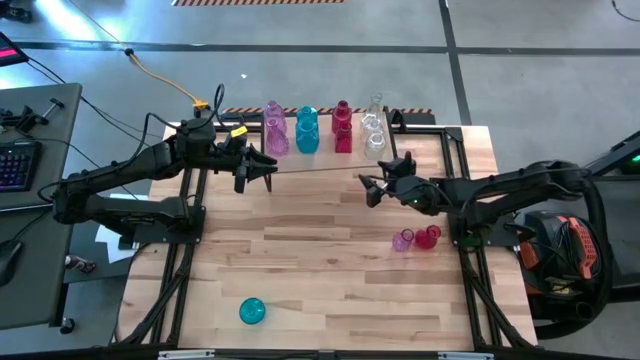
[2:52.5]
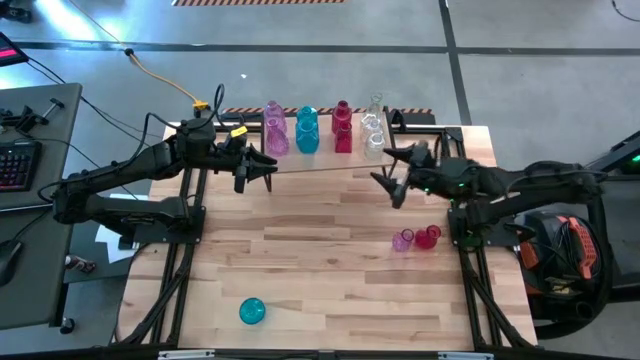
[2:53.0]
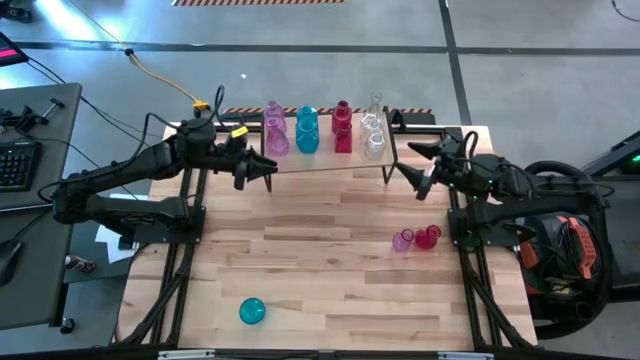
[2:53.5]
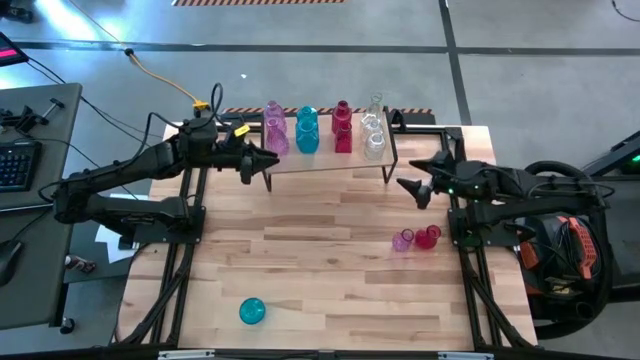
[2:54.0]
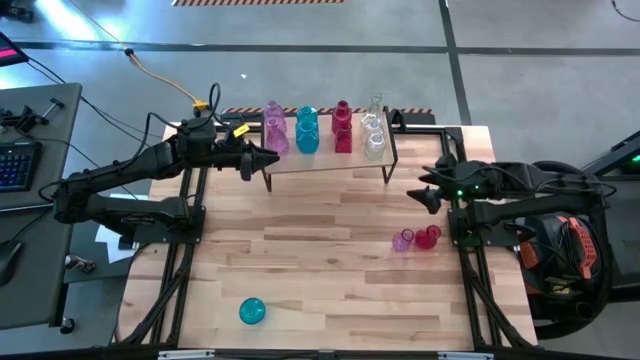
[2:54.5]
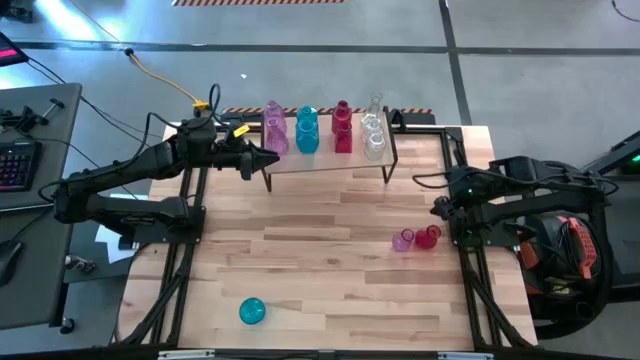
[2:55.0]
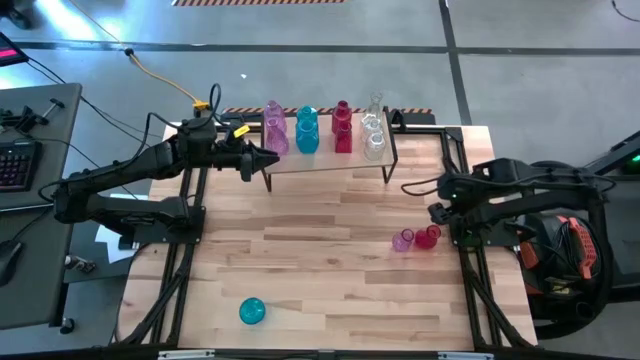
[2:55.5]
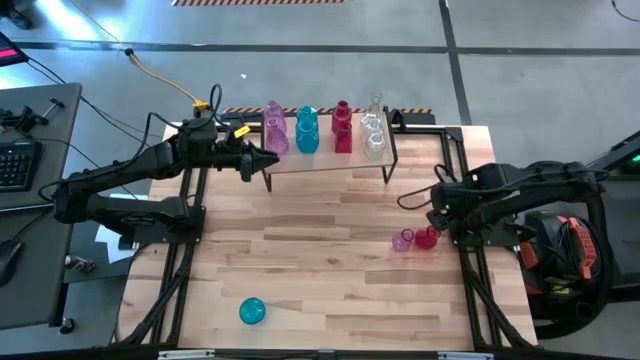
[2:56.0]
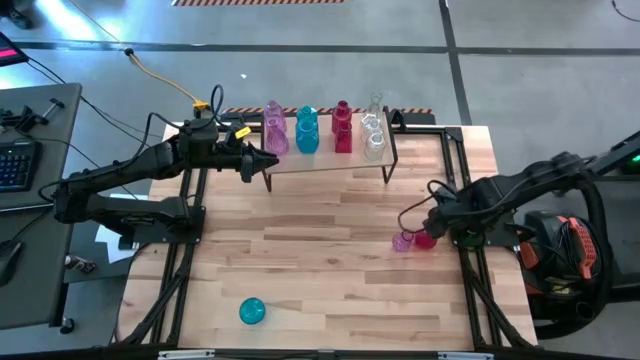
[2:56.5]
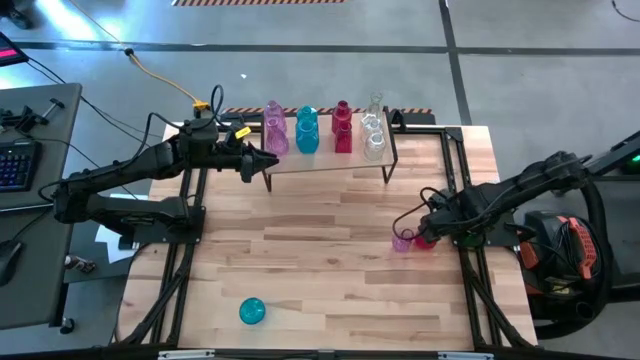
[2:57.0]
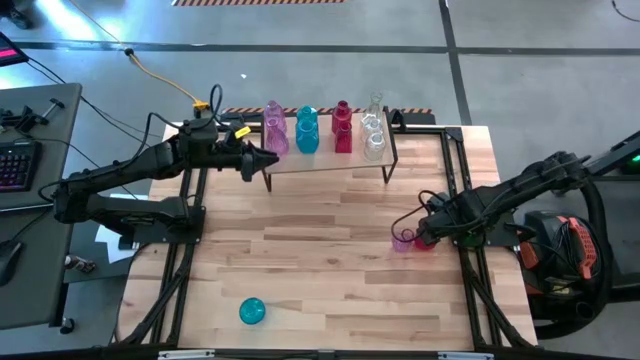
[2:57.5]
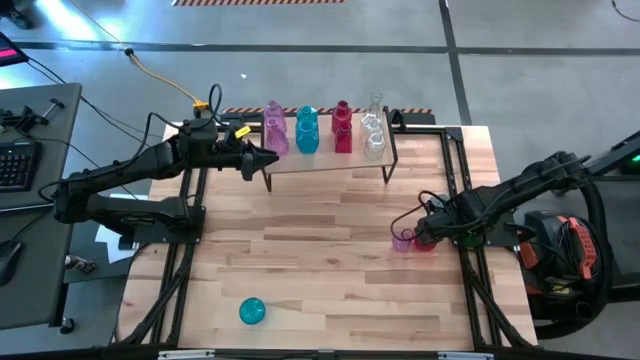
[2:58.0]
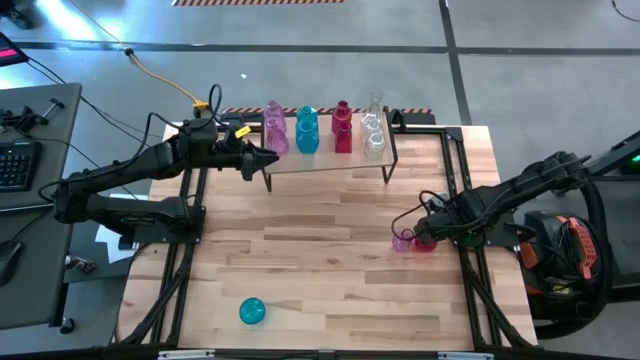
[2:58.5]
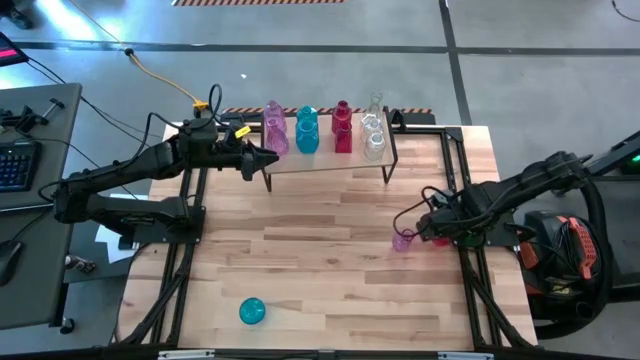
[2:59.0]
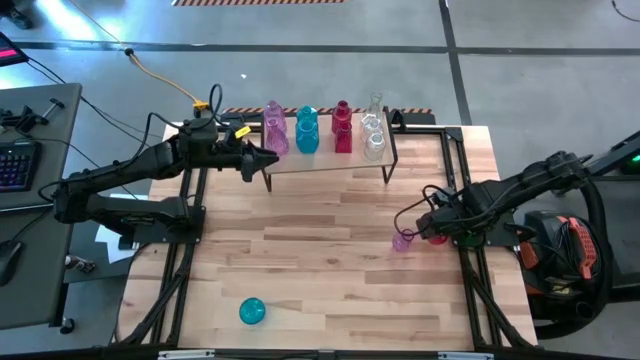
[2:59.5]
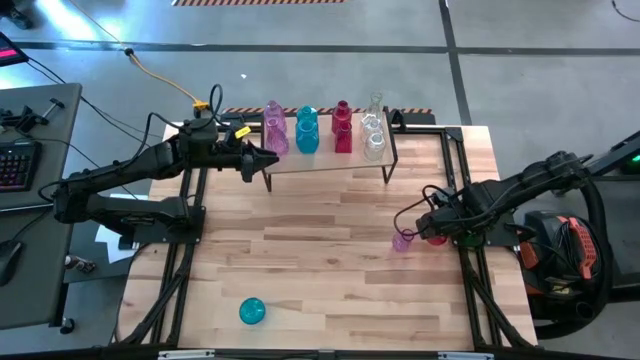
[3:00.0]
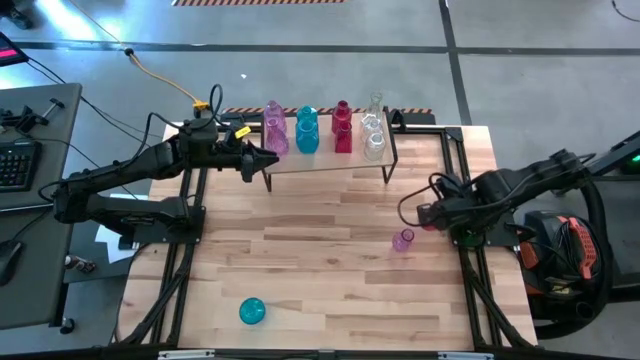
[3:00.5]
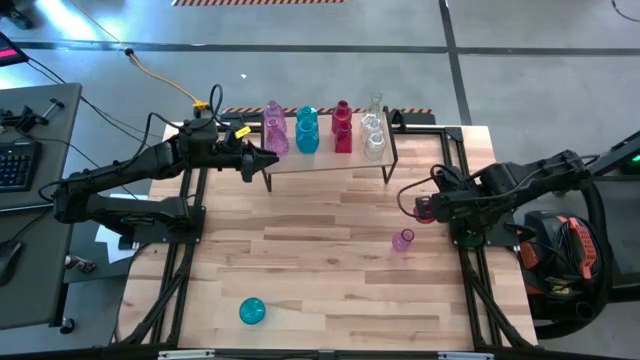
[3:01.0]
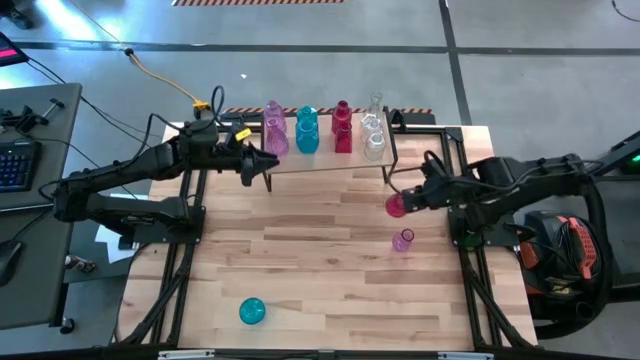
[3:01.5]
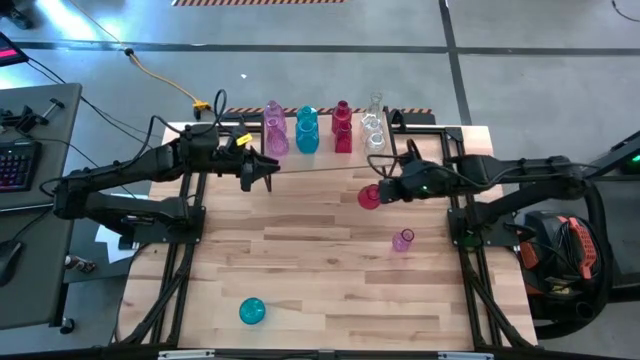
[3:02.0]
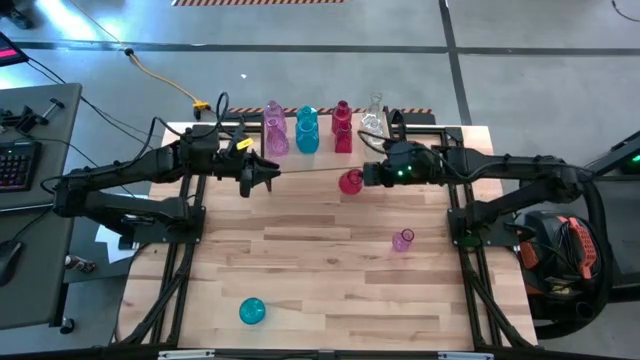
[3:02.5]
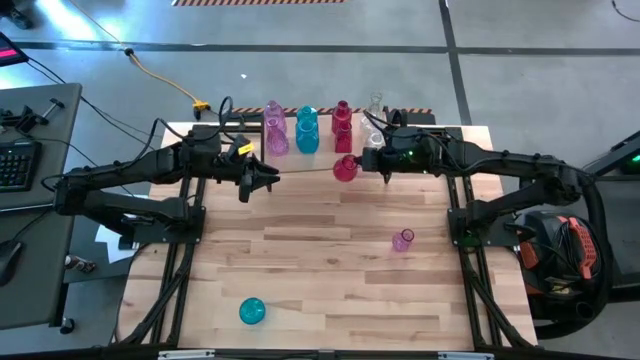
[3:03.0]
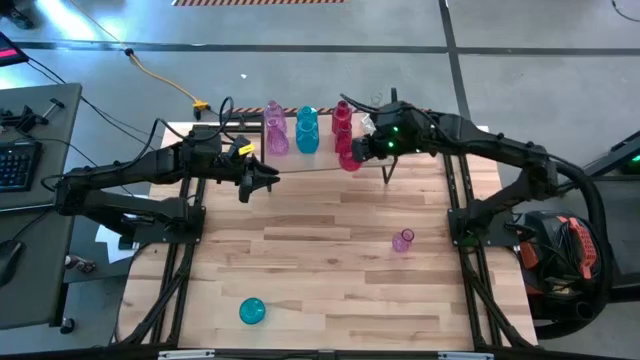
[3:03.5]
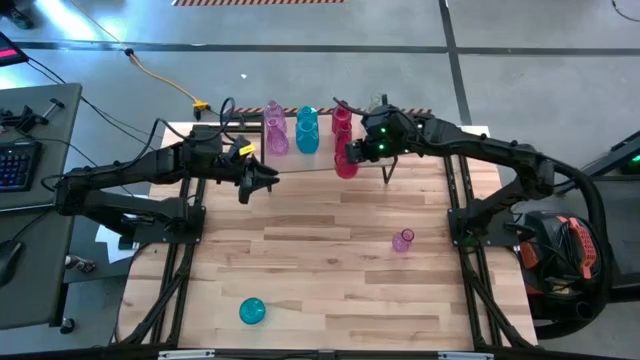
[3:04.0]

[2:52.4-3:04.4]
Task: sort vases onto shelf
Put the red vase on the shelf aligned with the other red vases

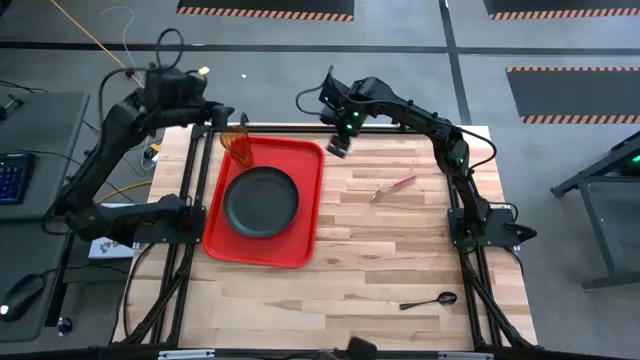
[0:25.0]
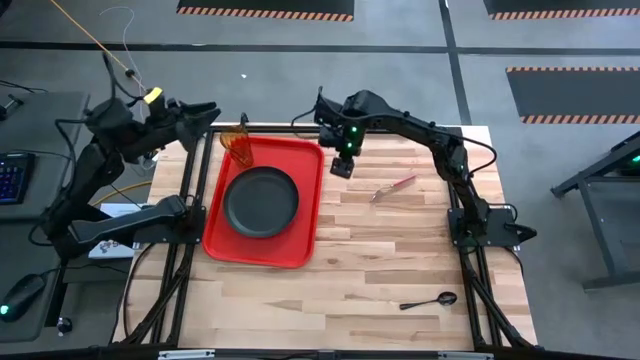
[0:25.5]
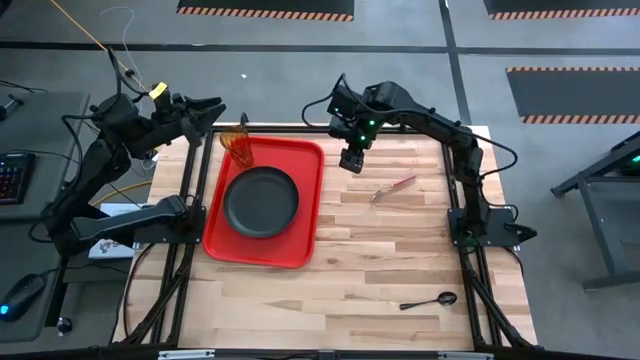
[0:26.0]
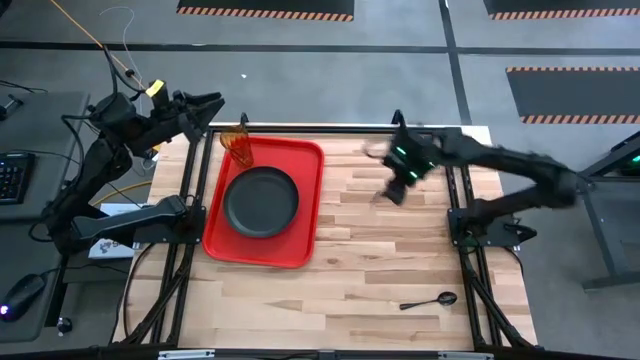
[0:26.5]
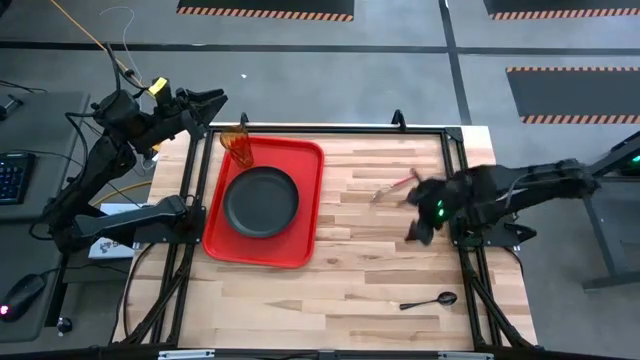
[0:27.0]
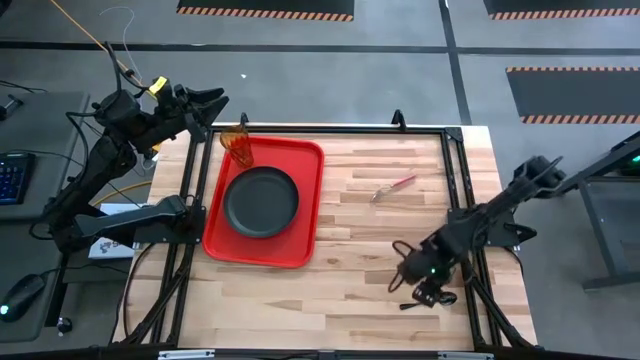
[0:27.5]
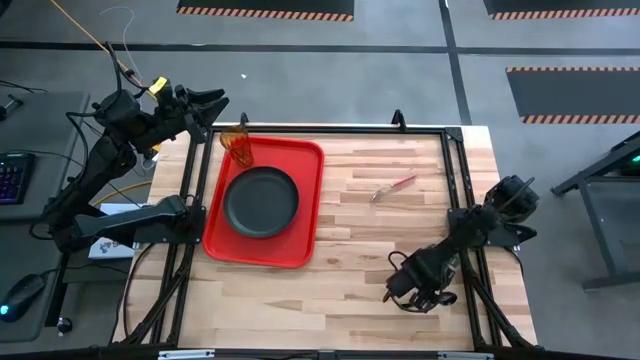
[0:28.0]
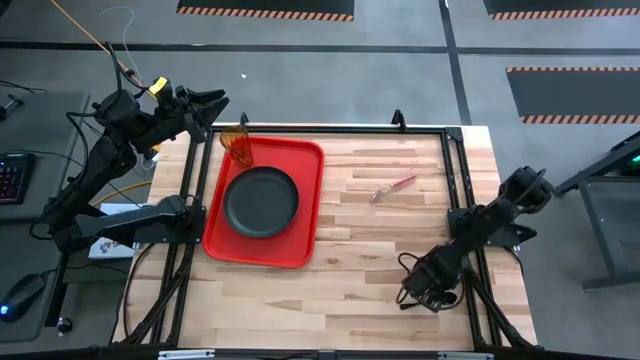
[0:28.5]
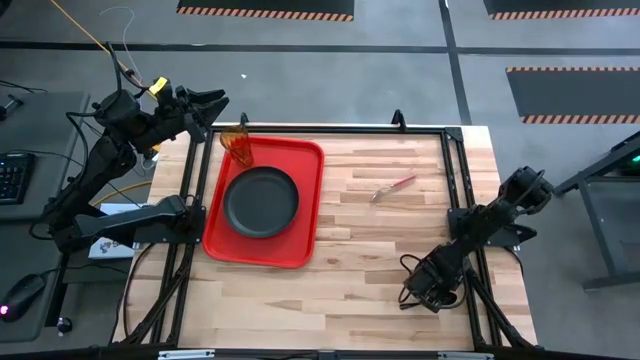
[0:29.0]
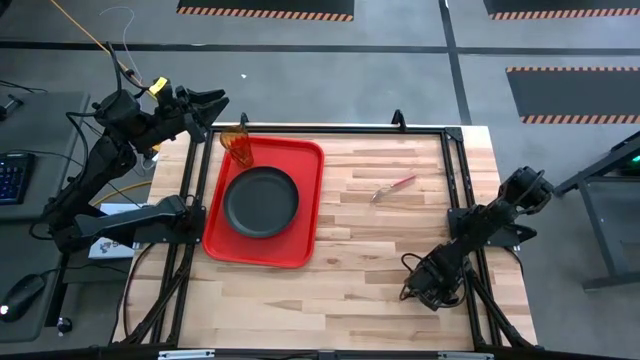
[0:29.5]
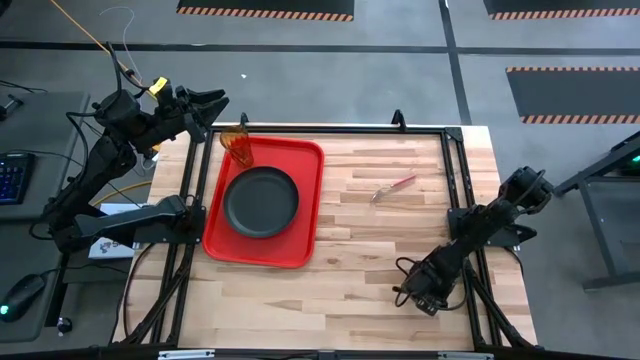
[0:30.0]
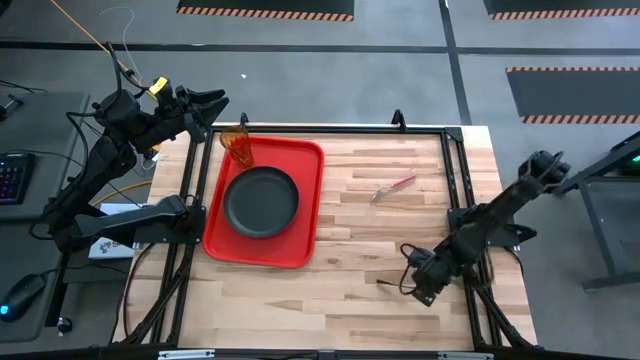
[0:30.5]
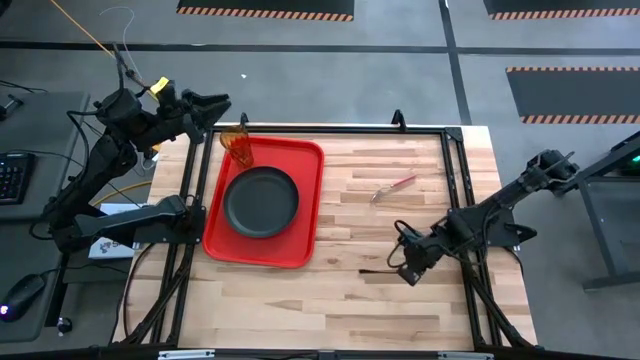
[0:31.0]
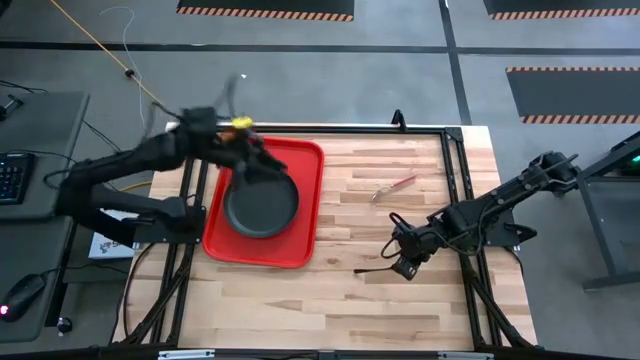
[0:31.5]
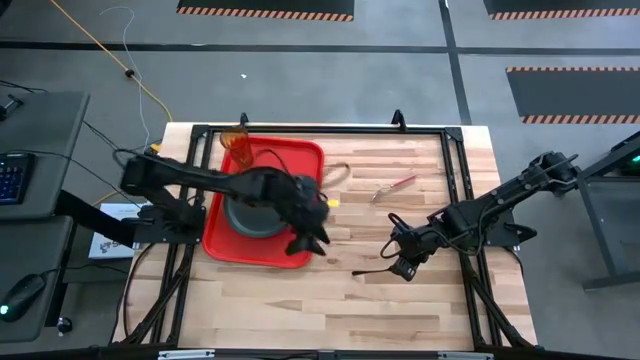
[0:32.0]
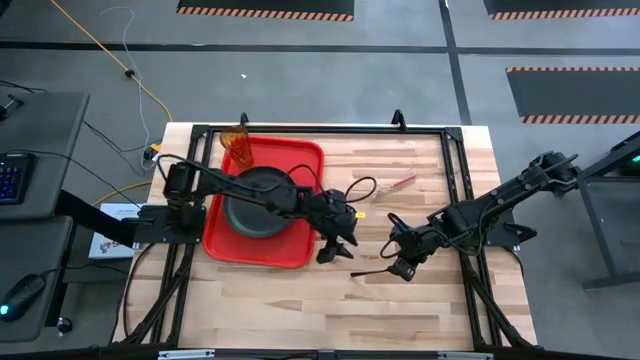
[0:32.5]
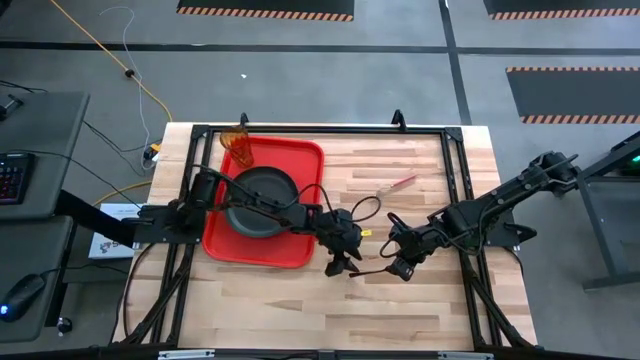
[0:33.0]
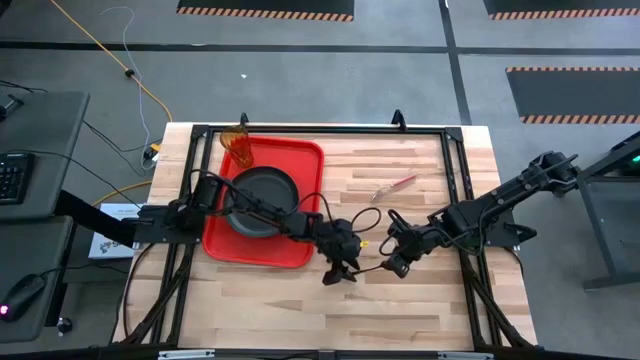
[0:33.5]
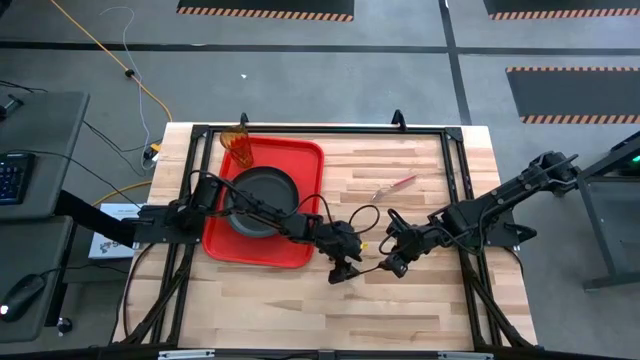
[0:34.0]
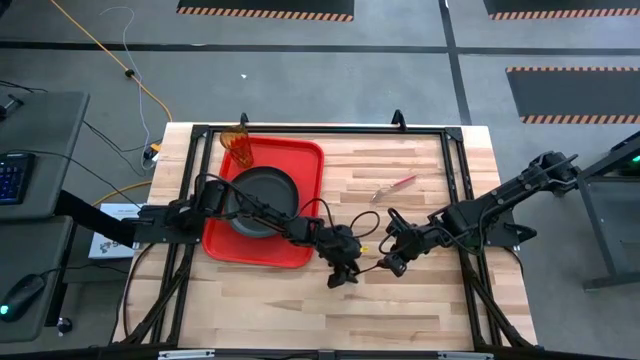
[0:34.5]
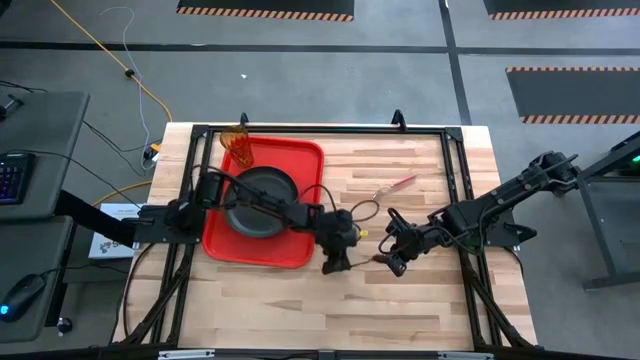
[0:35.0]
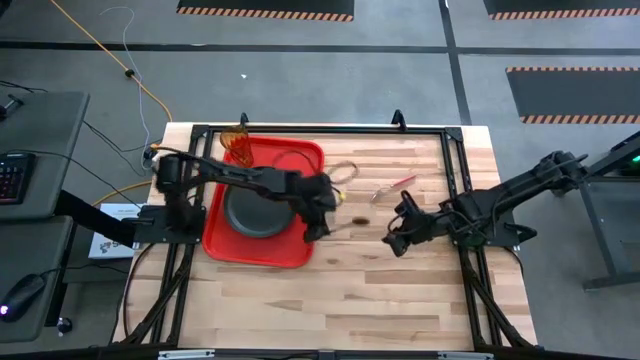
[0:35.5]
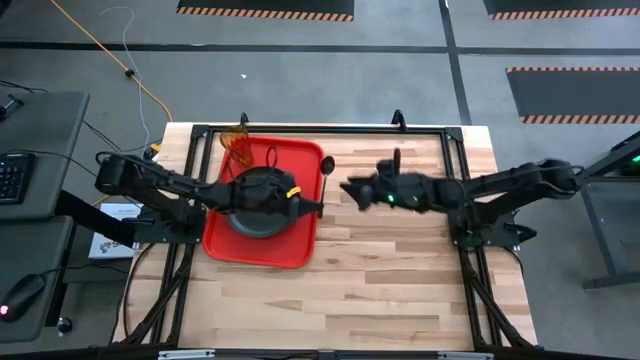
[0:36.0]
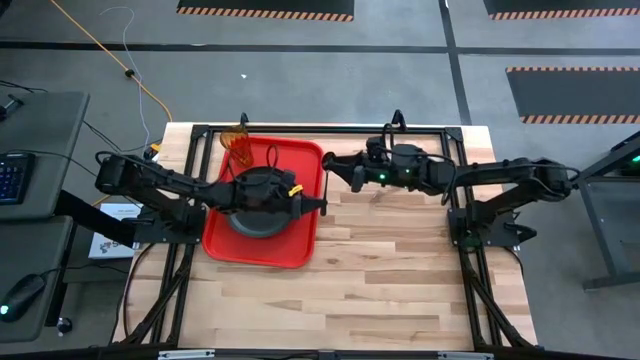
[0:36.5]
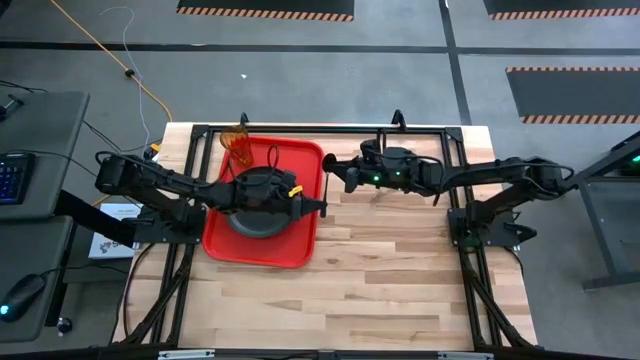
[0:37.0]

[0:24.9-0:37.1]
Task: Pick and place plate/cup/fork/spoon on tray
Put the black spoon on the red tray to the left of the red tray
